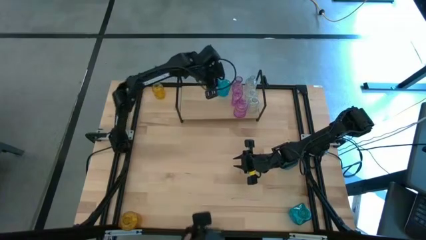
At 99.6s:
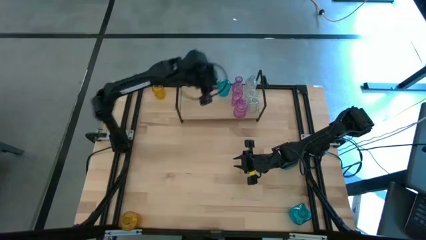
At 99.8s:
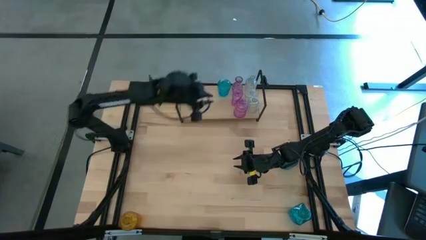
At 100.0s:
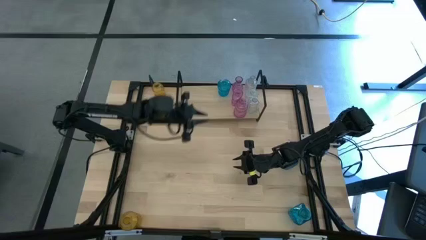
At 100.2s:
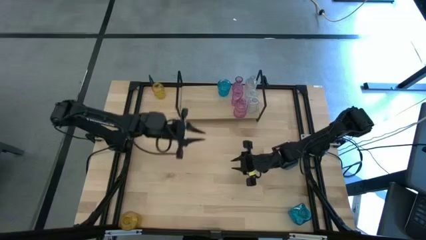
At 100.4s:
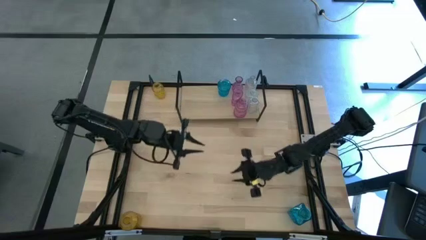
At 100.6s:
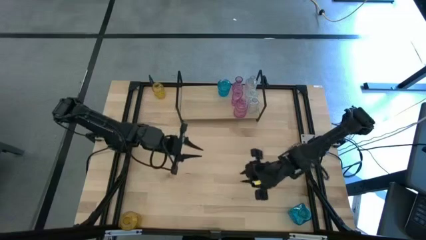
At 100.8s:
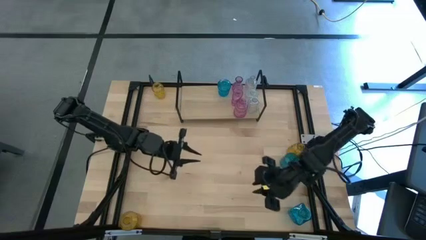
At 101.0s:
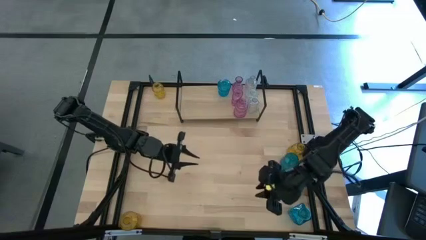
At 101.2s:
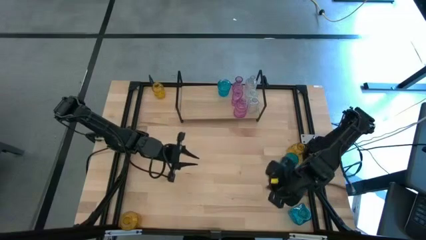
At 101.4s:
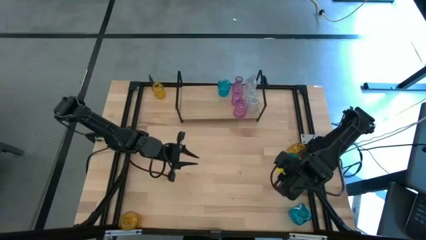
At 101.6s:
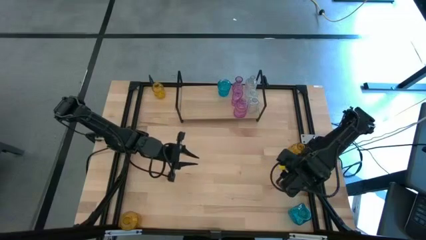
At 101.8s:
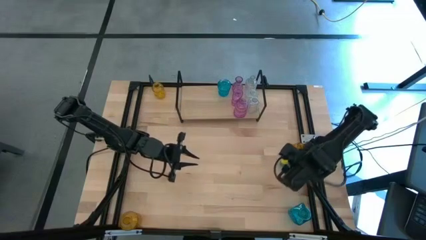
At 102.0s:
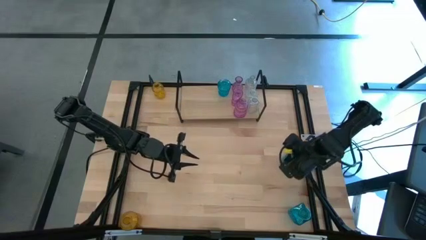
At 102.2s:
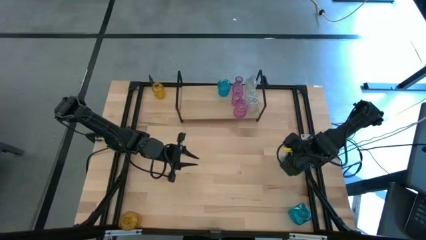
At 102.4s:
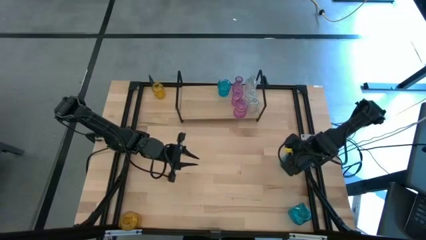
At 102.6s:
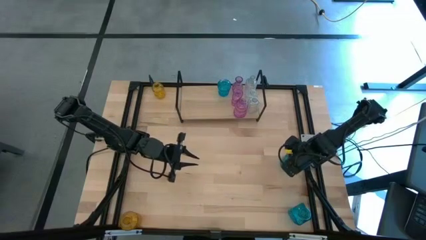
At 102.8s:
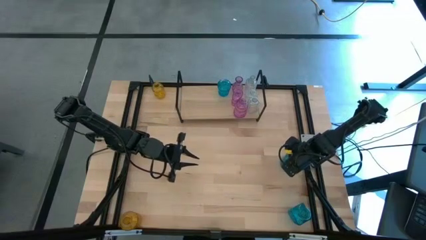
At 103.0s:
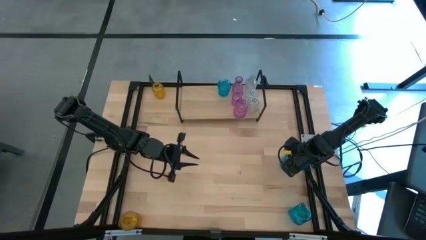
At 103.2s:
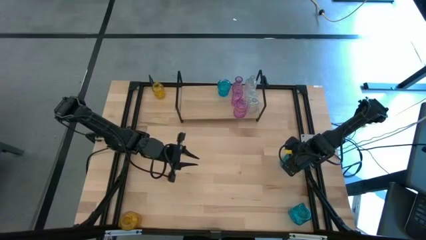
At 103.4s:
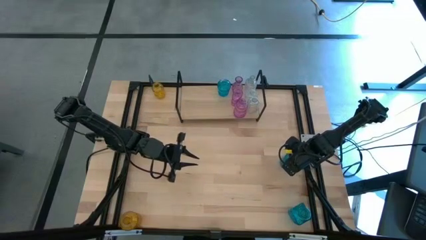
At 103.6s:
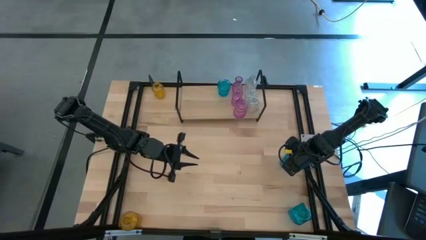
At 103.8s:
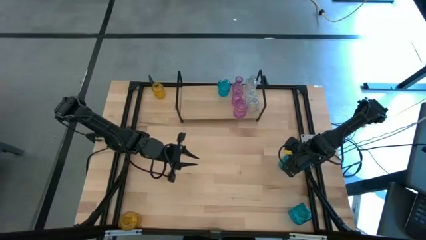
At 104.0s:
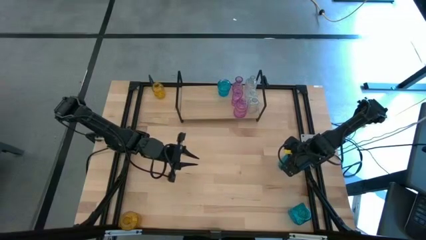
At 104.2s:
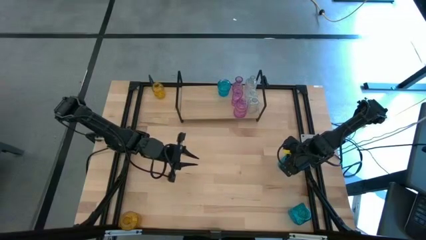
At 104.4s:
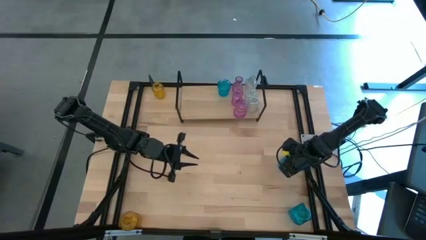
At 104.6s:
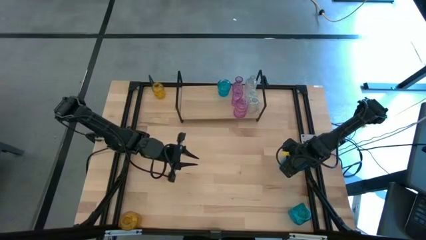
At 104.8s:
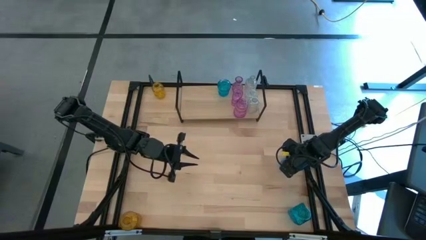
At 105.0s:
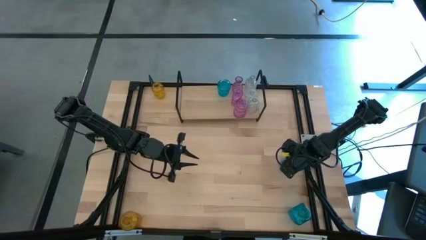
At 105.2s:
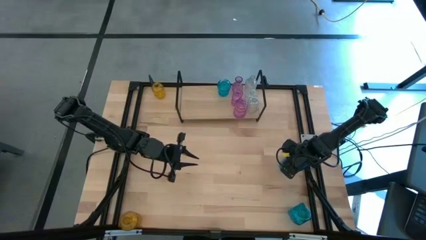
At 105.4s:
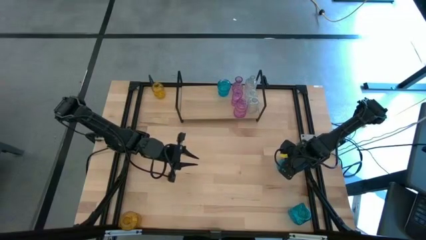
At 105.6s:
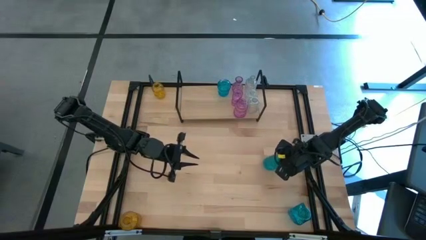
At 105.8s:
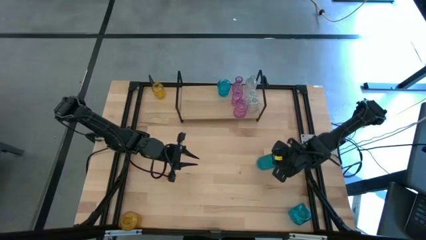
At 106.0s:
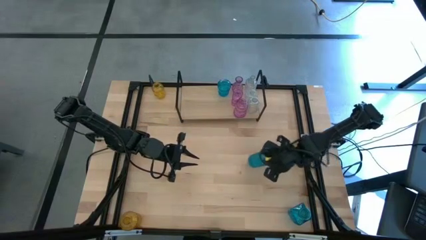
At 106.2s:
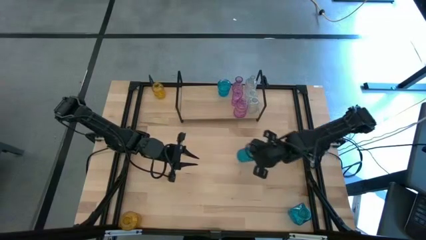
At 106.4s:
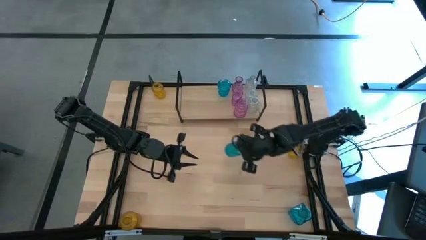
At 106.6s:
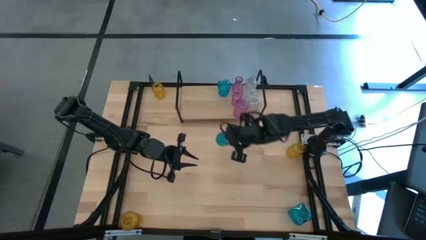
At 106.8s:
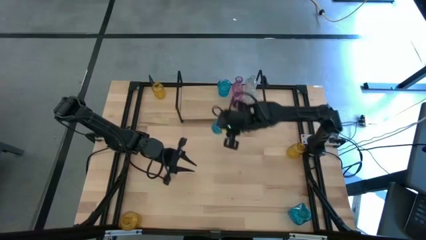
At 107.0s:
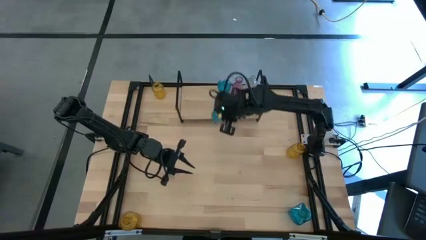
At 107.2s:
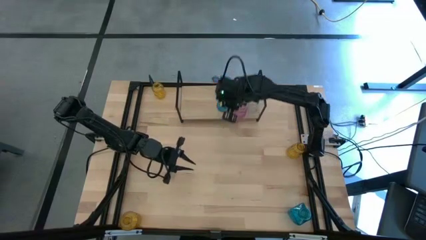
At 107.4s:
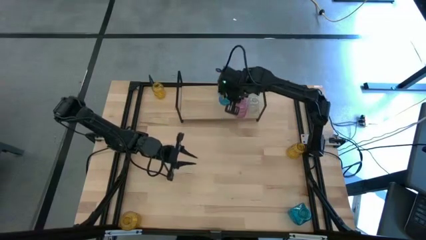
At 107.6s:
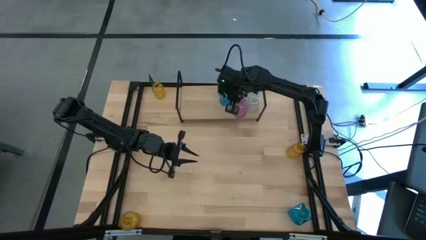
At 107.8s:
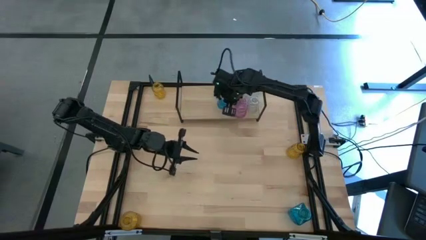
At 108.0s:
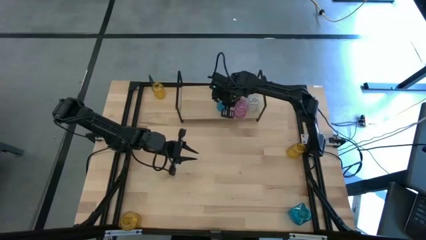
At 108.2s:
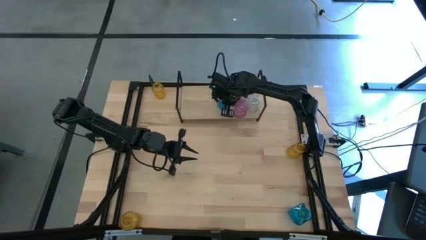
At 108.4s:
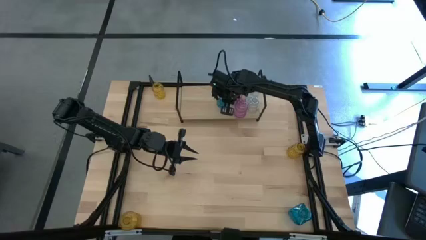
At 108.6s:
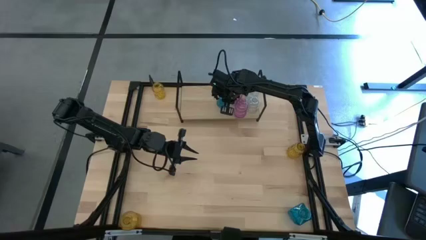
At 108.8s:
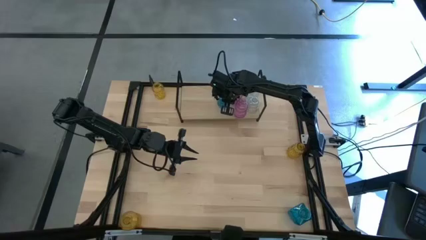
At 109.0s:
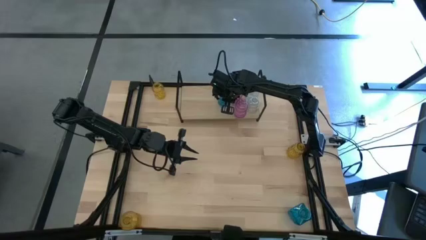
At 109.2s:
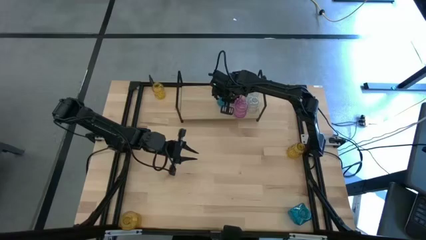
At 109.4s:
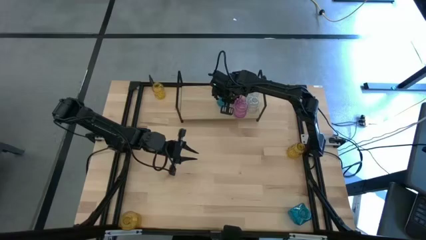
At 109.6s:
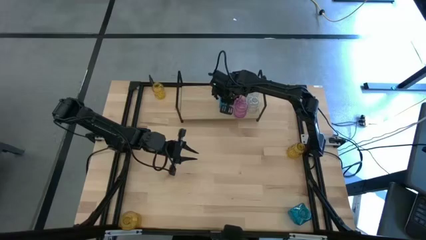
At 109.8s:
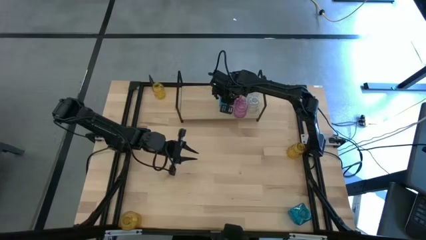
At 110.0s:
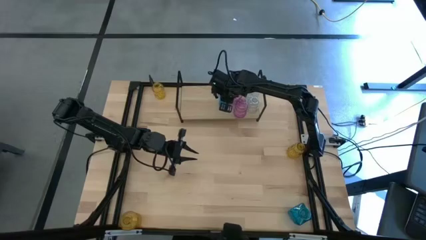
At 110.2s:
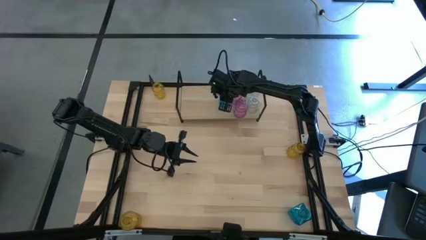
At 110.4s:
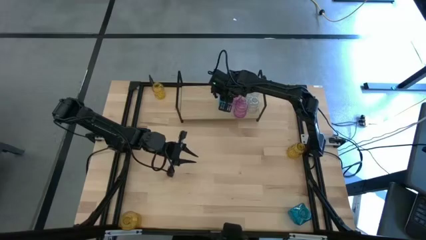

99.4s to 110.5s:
Task: sort vases onto shelf
Put the top blue vase aligned with the other blue vase on the shelf

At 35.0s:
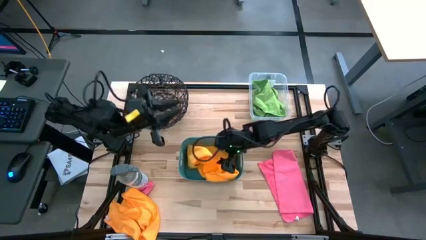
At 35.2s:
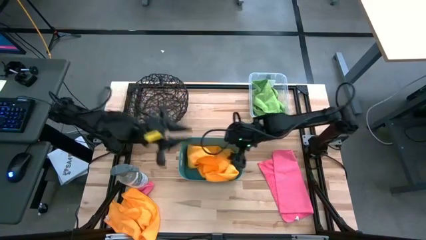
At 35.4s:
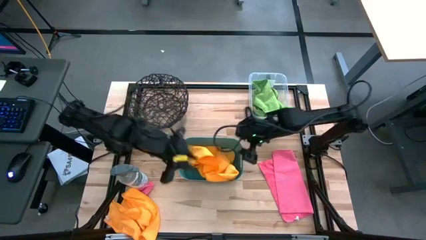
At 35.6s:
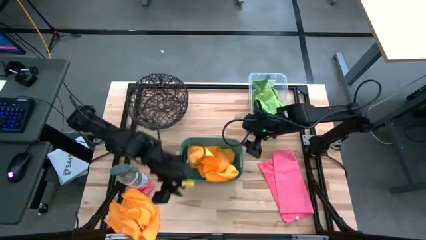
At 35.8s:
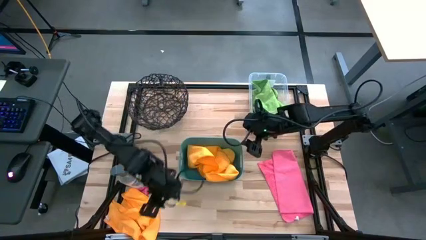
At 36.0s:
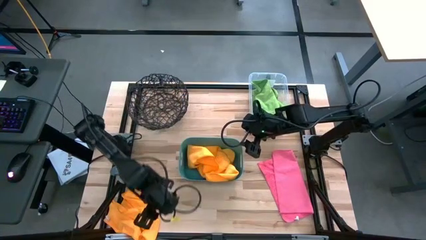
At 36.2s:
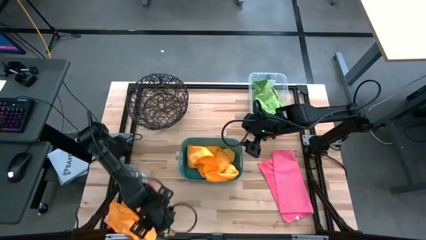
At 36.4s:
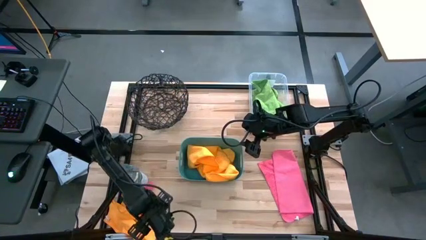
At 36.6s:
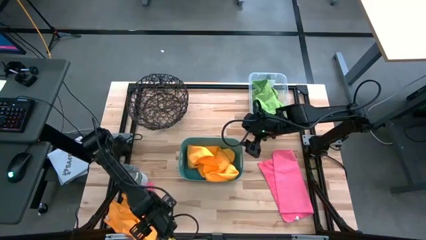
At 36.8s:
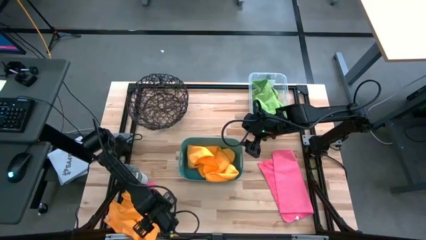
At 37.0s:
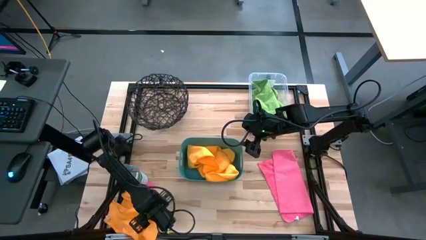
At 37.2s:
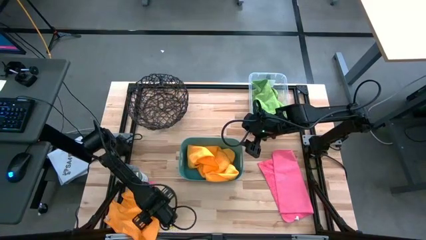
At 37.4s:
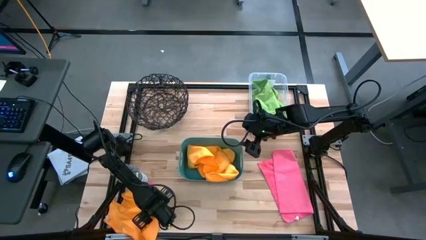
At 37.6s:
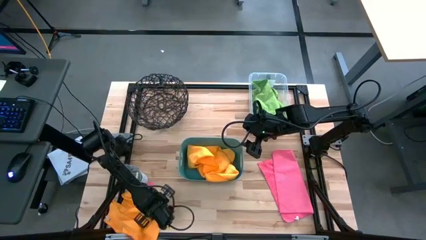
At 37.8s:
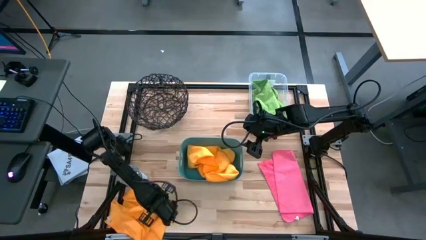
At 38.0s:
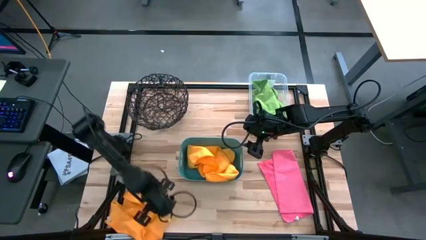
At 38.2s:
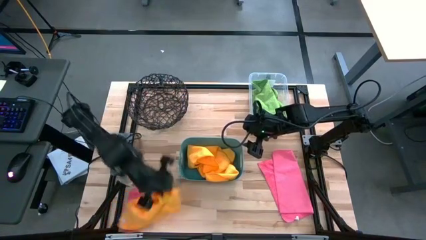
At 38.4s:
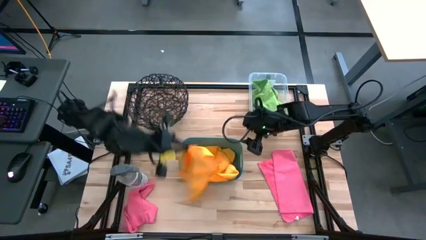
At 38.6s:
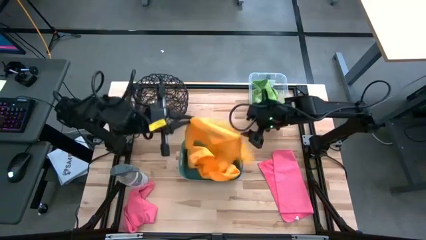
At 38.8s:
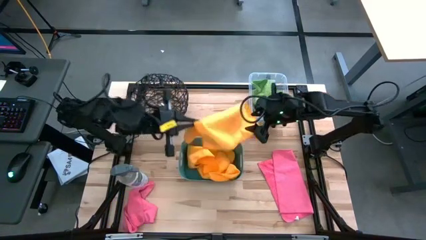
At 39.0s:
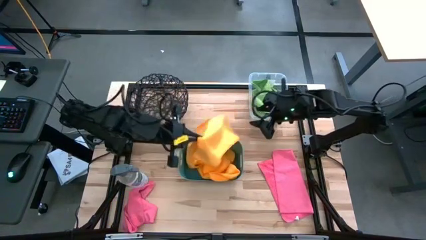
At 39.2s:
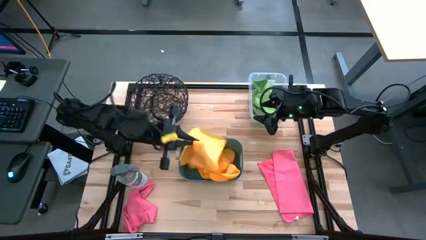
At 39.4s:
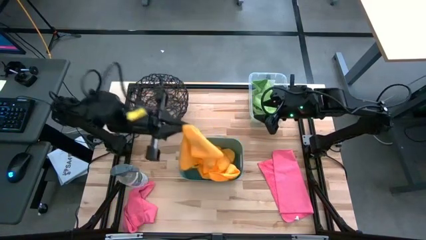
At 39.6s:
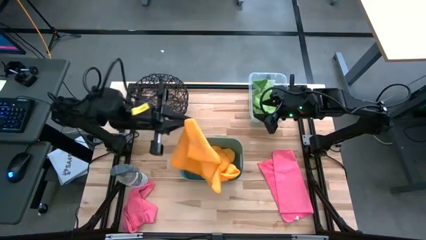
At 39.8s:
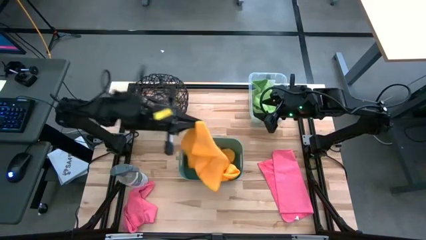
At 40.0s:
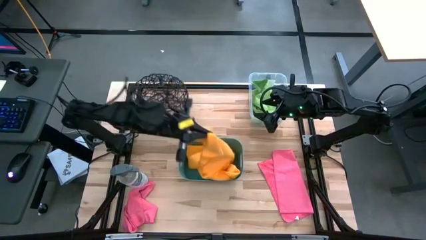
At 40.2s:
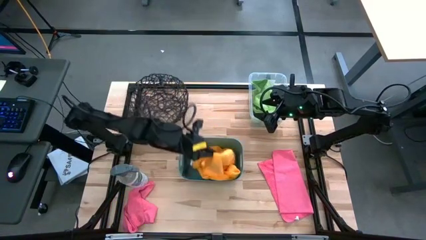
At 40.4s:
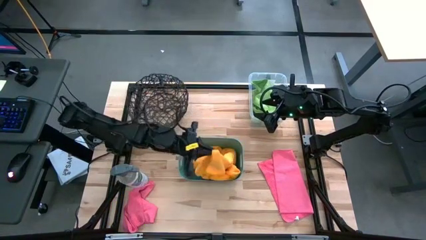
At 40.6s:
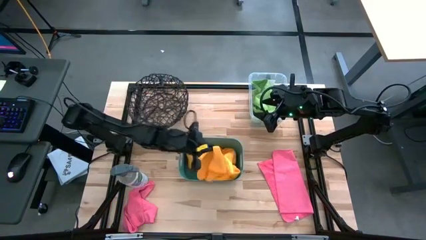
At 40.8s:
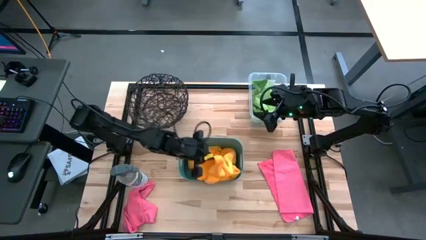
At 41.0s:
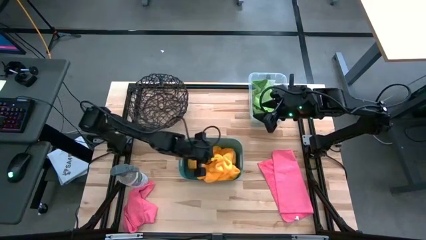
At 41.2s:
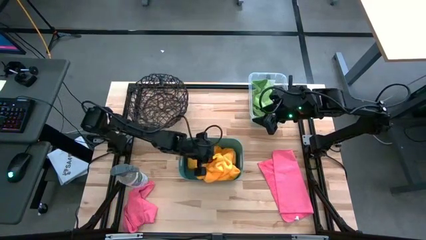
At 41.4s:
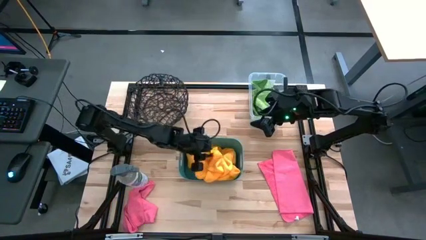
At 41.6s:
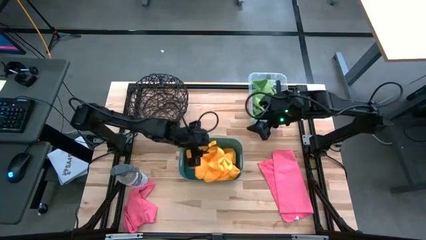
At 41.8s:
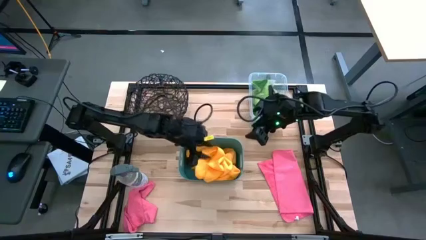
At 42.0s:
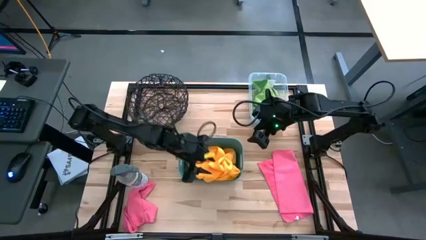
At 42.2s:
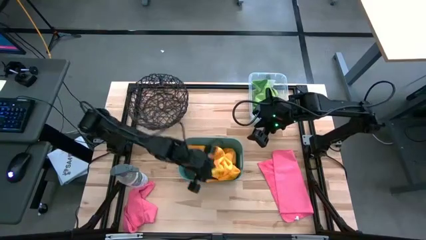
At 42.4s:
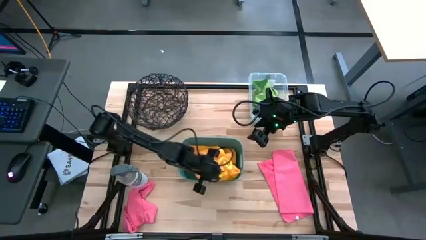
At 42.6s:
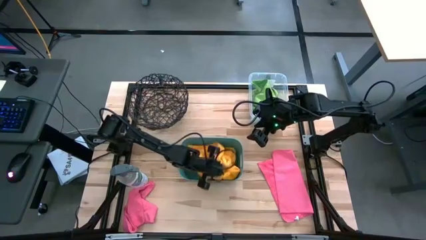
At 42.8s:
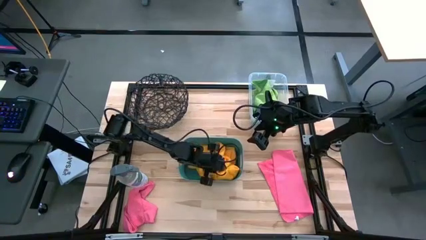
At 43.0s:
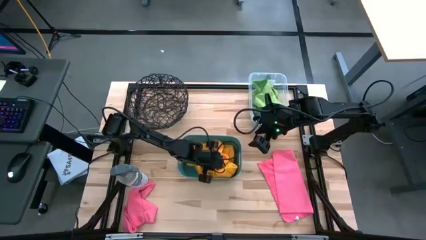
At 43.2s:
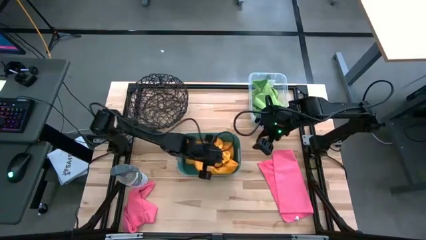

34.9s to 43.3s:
Task: Sort microfiber towel by color & place in baskets
Put the yellow microfiber cloth into the blue bin
